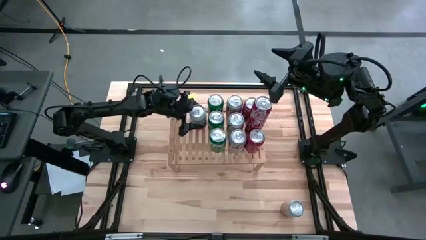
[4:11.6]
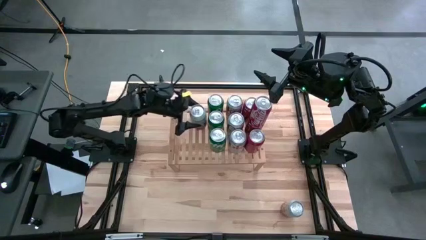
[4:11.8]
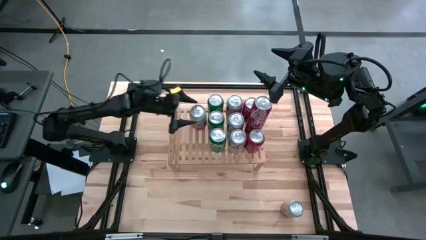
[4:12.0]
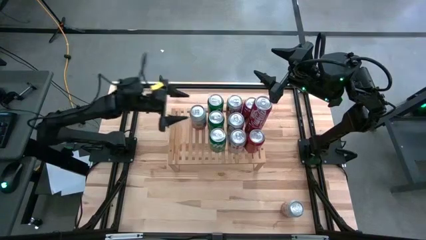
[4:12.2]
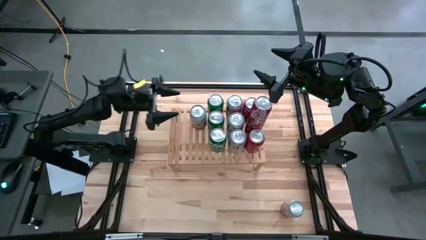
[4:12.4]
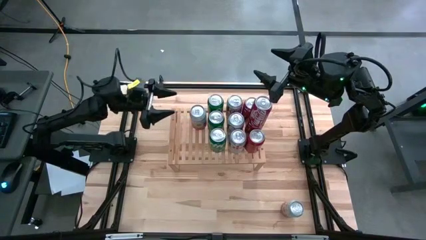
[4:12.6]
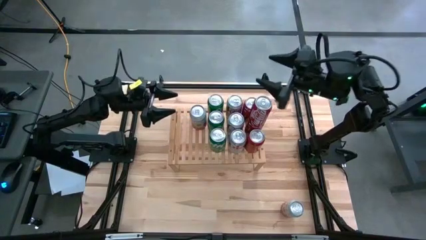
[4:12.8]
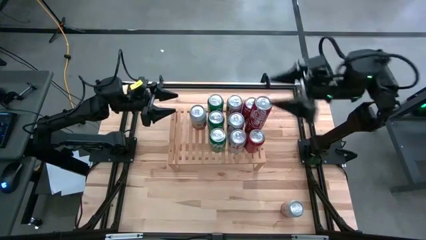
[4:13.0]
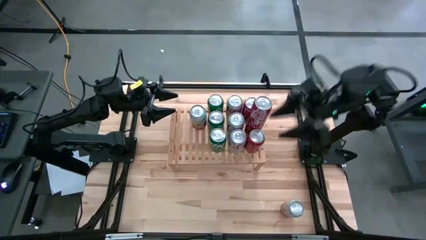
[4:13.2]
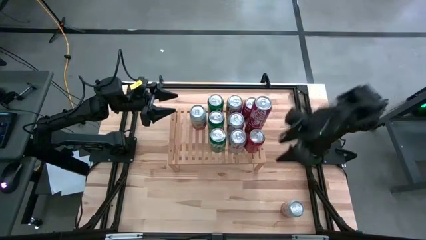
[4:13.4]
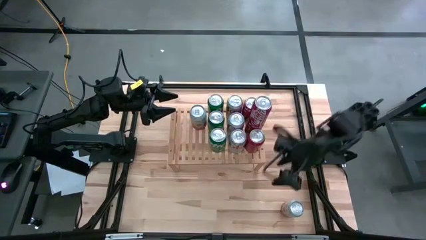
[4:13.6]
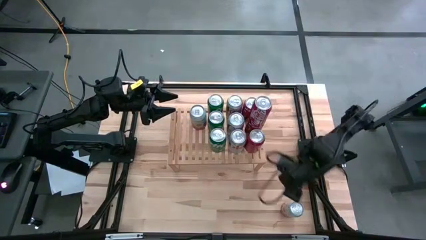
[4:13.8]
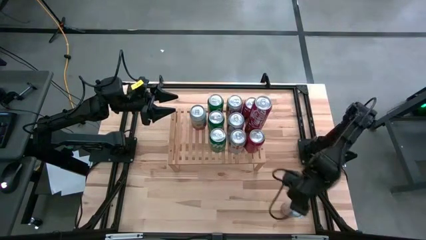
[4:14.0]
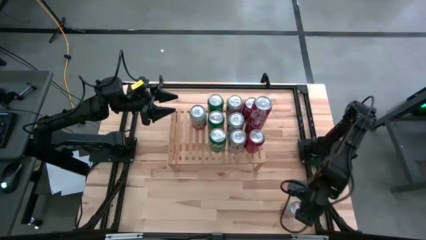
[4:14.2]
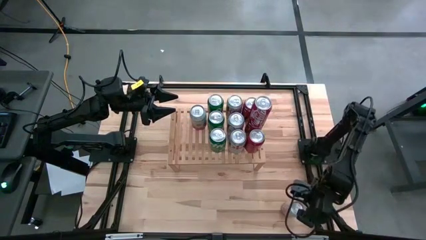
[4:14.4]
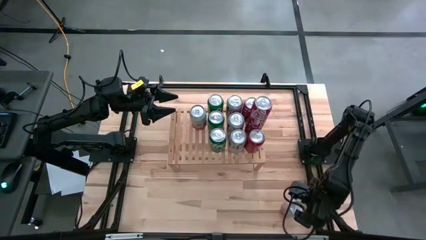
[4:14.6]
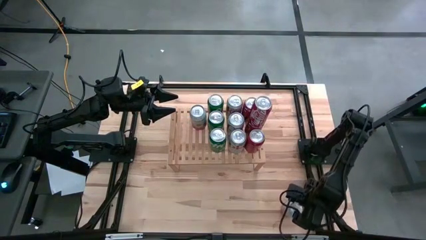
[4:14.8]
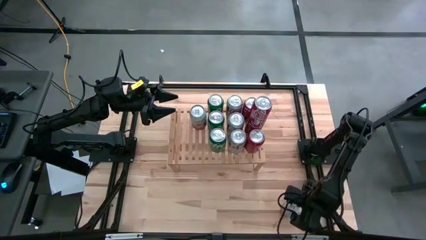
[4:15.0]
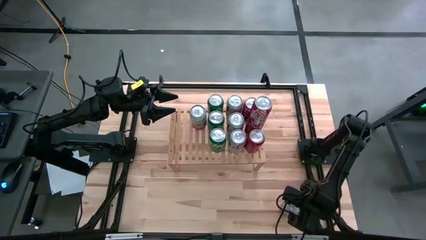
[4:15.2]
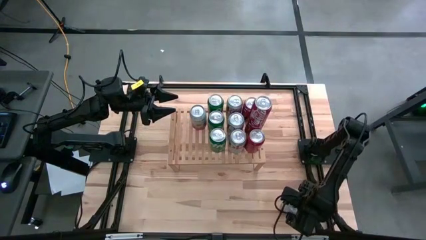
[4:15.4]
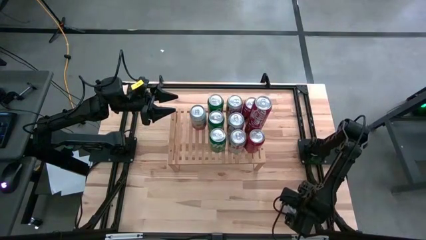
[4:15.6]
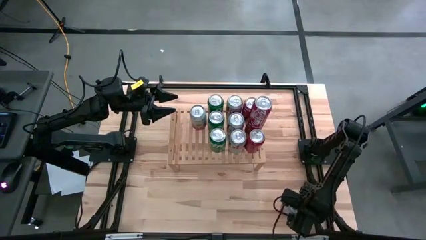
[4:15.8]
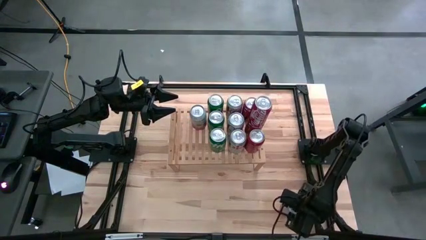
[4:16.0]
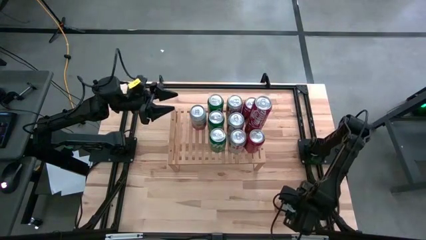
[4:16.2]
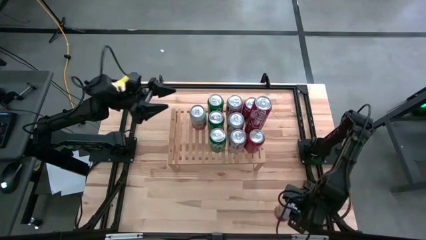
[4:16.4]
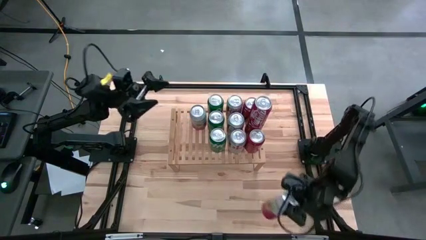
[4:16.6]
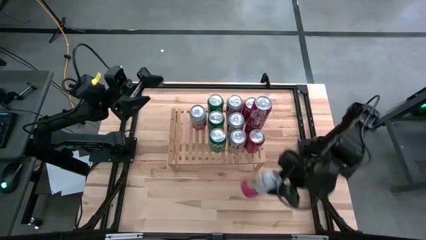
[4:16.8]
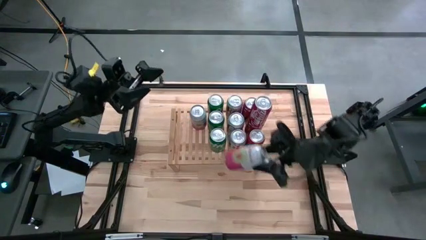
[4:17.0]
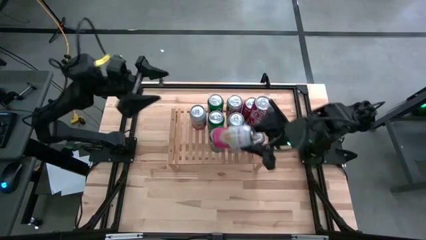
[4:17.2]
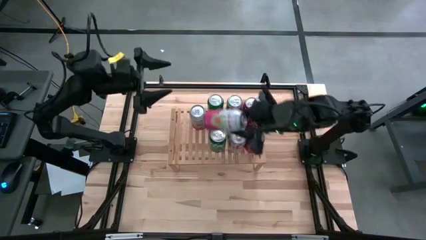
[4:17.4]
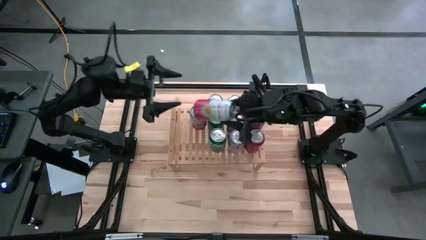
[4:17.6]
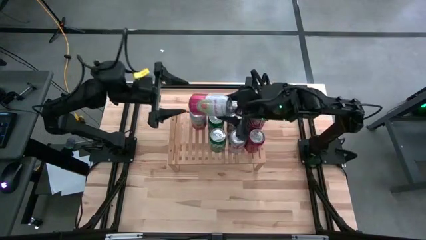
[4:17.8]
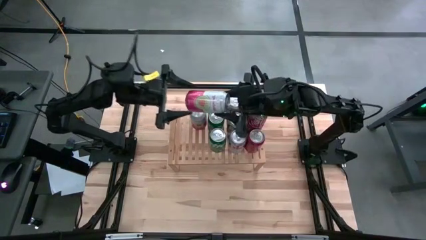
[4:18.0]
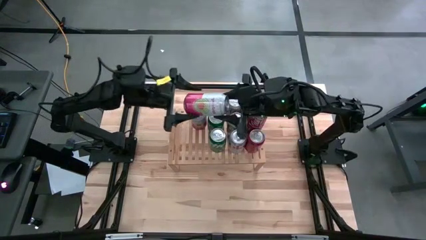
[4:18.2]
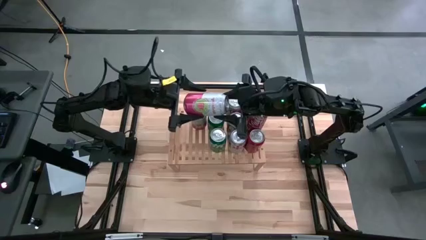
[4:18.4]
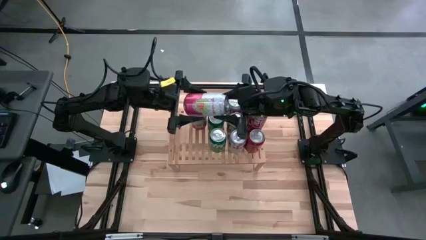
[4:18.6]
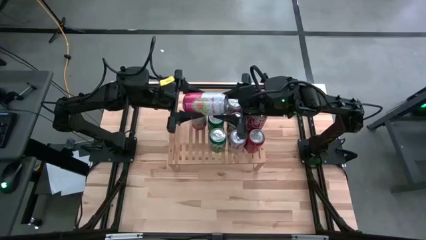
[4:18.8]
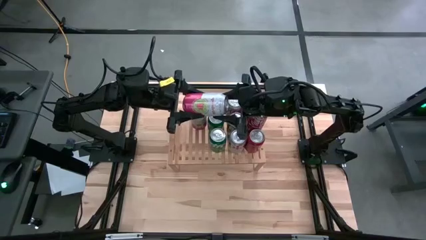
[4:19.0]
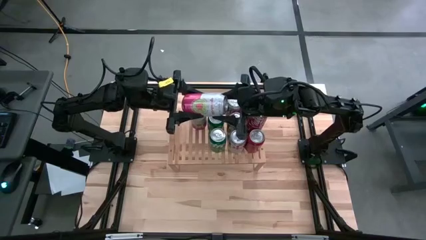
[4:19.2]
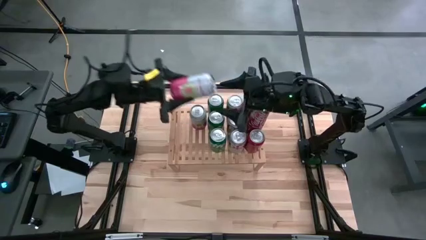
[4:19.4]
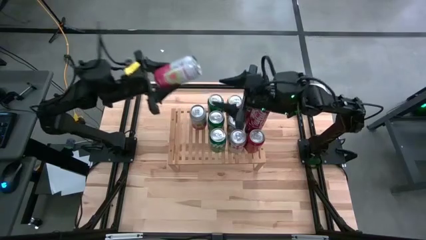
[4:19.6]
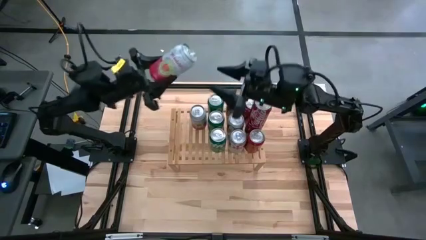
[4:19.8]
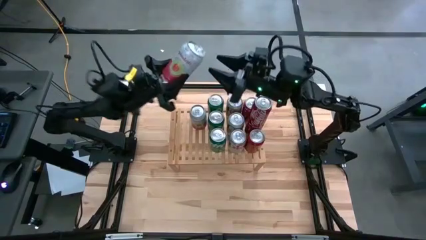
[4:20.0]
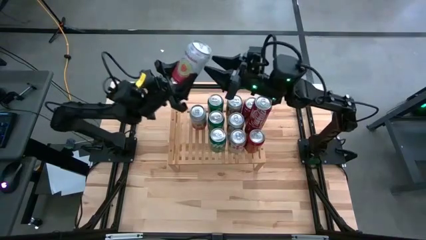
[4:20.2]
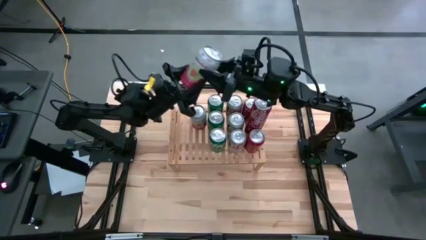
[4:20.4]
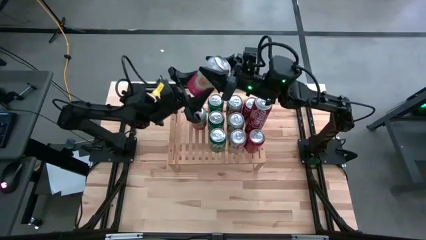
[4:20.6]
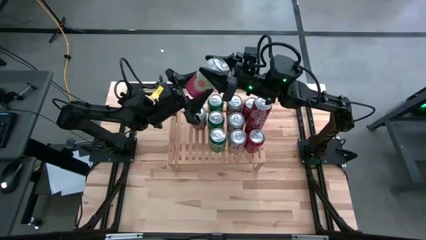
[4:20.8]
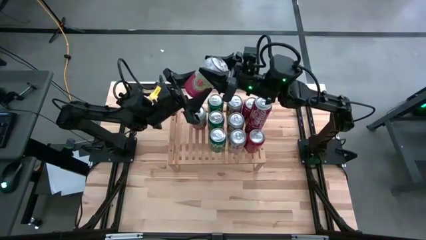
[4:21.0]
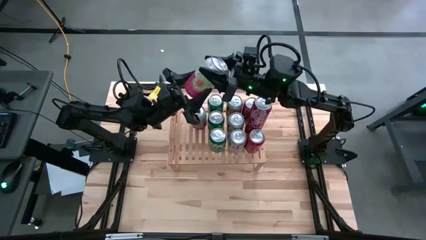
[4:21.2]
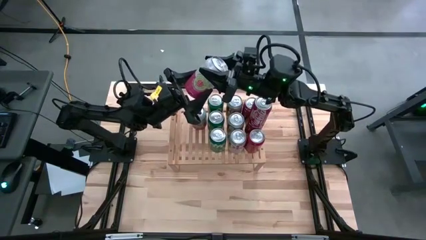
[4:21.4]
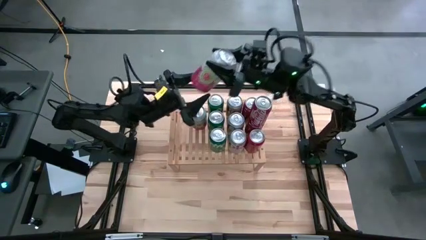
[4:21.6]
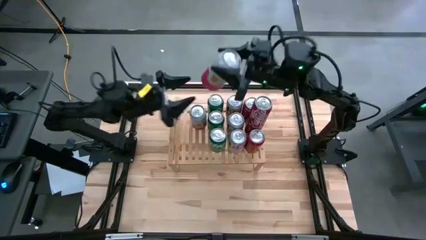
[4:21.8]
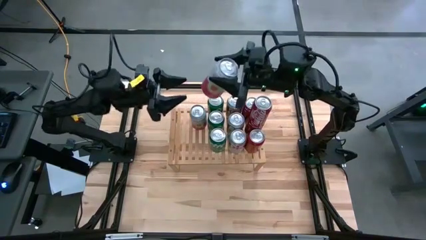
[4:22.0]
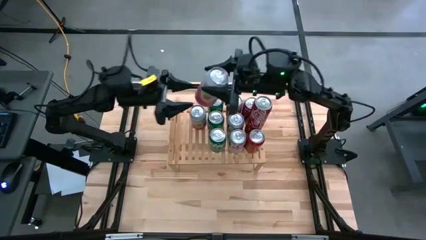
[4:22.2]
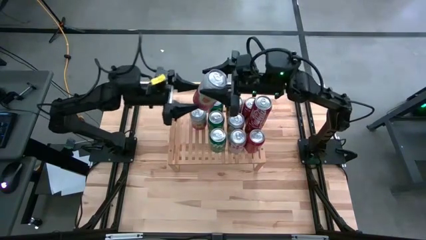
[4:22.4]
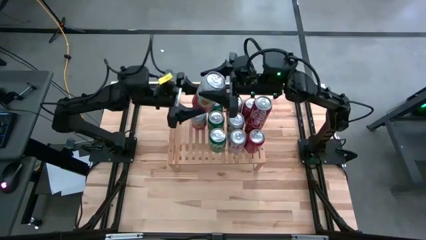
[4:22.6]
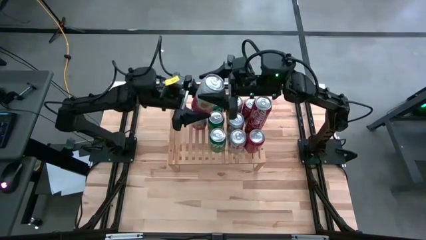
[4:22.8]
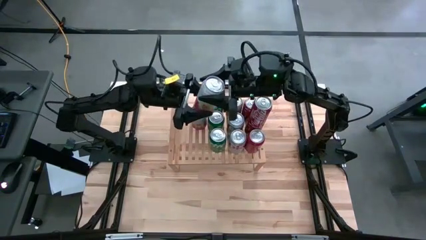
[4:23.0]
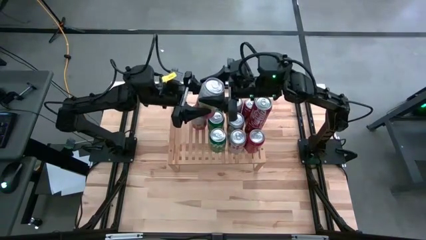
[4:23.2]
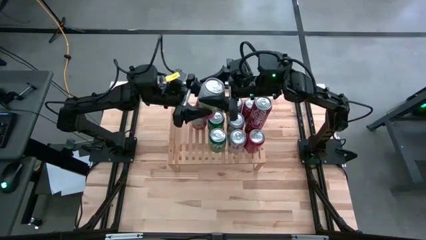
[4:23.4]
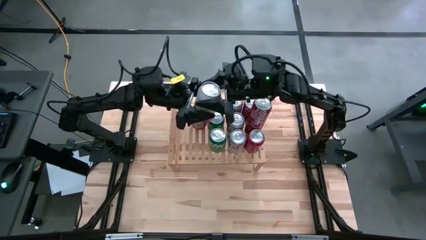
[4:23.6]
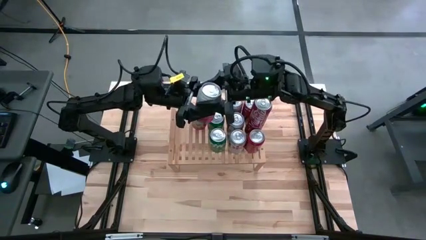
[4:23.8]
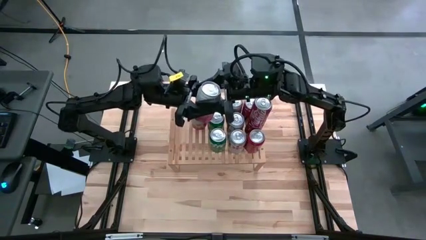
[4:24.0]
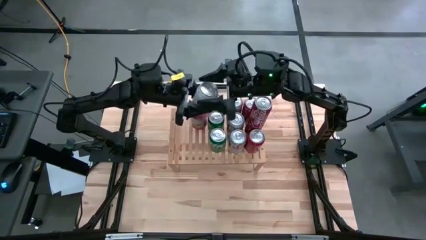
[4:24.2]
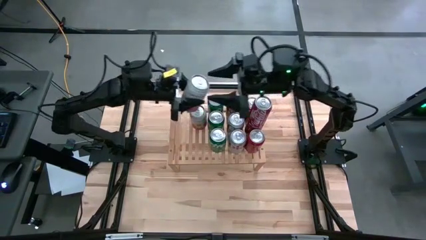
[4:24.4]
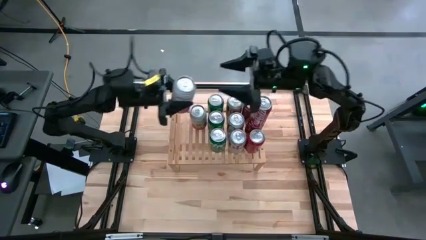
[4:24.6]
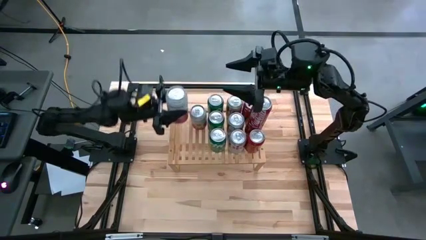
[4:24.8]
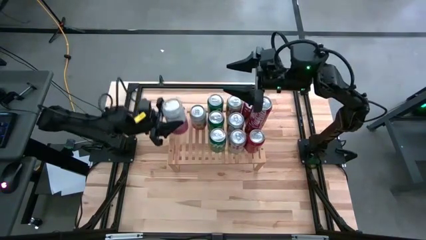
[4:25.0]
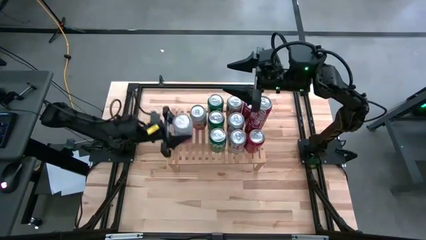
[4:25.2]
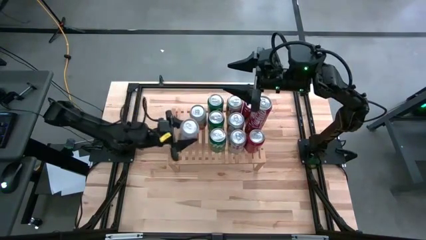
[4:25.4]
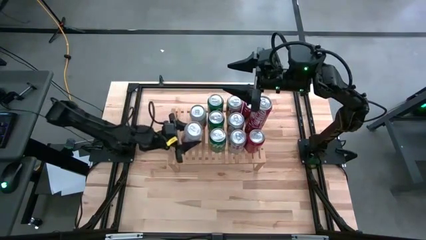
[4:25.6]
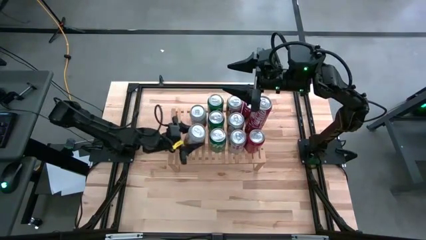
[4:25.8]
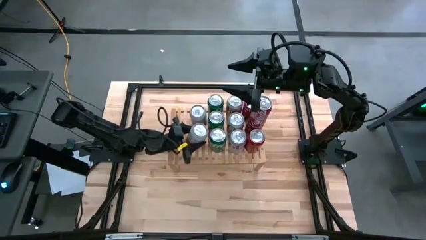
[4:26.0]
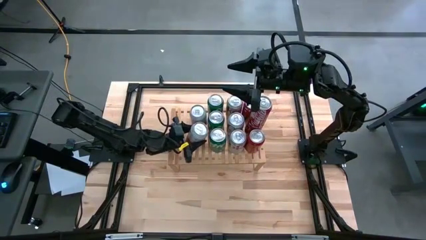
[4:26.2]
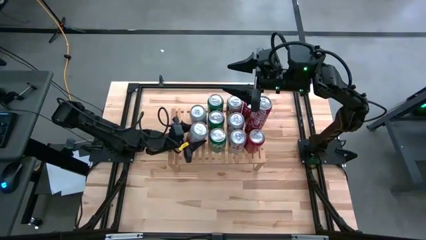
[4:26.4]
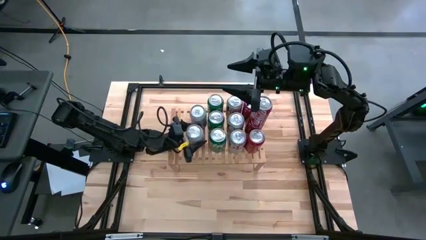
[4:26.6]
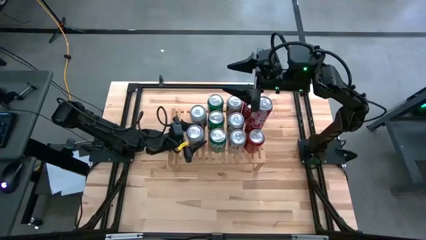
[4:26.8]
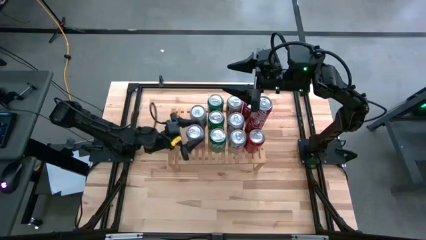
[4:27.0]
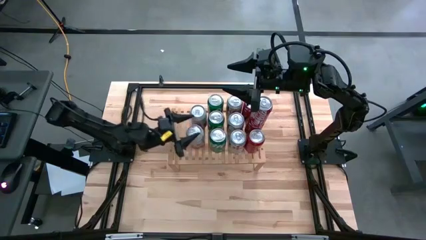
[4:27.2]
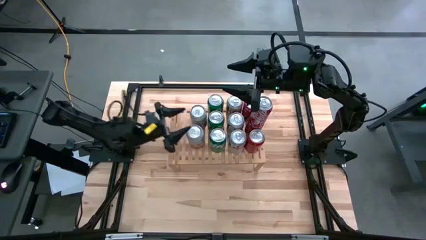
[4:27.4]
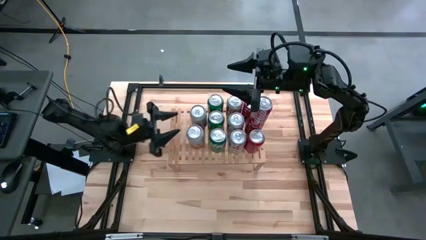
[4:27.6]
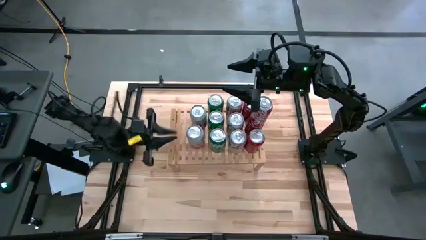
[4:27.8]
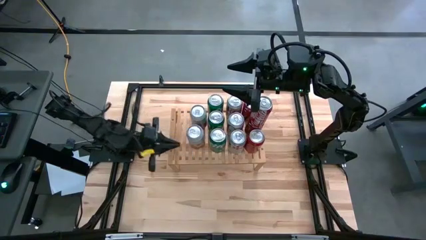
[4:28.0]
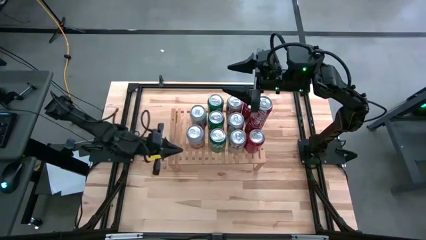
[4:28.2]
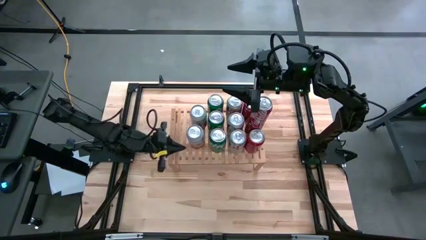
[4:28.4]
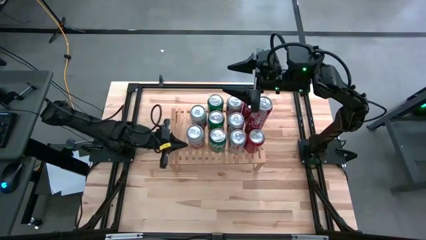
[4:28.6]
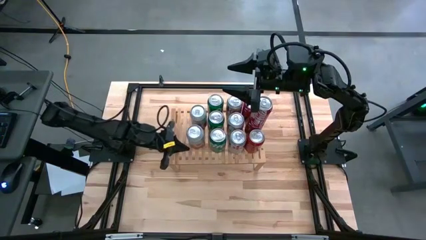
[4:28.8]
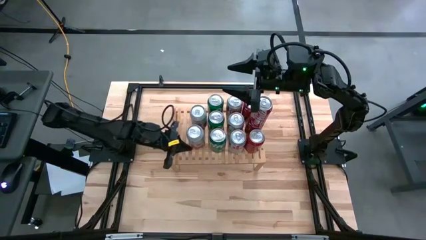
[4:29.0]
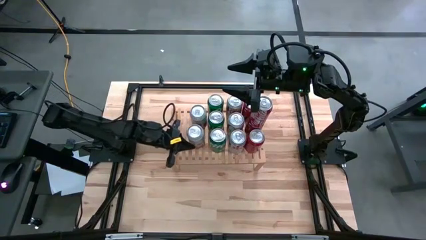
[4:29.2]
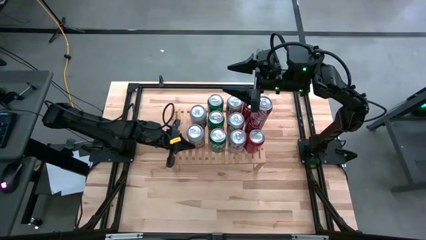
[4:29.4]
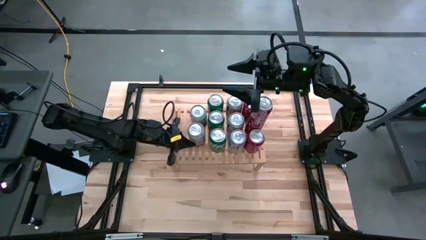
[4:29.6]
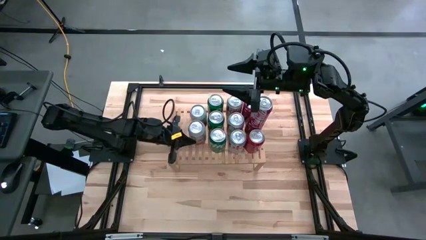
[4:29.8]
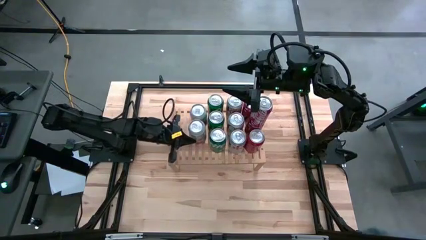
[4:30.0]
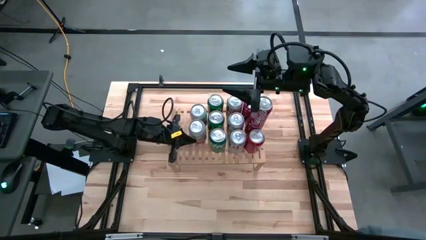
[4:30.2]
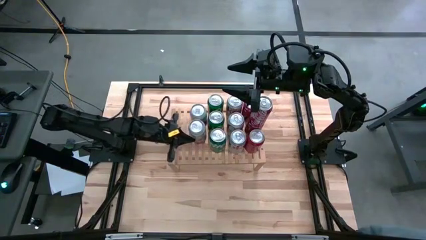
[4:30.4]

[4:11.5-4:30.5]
Task: Place canned beverage on shelf
Put the white pink soda can on the shelf
